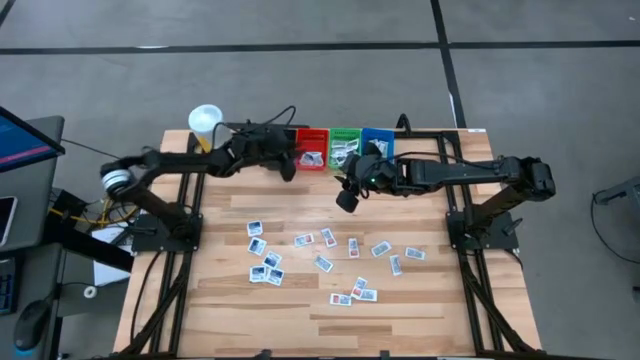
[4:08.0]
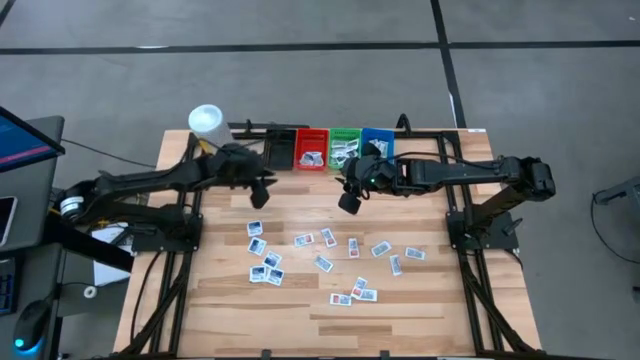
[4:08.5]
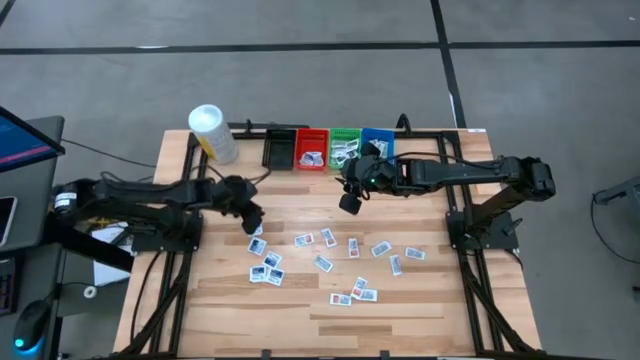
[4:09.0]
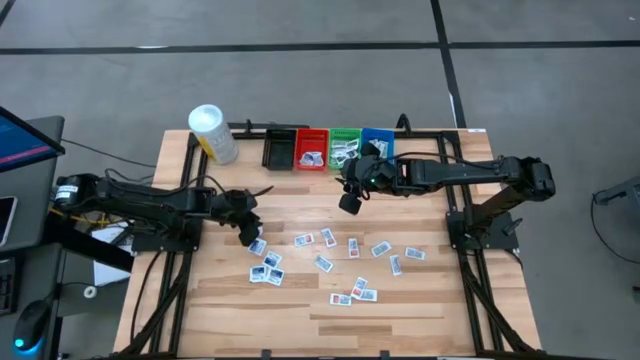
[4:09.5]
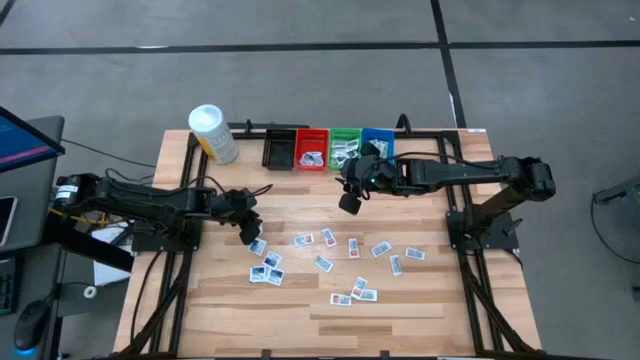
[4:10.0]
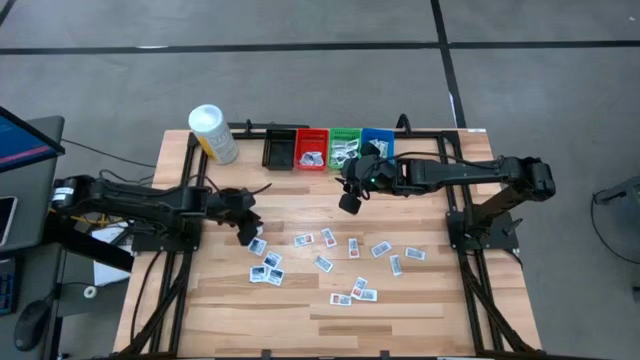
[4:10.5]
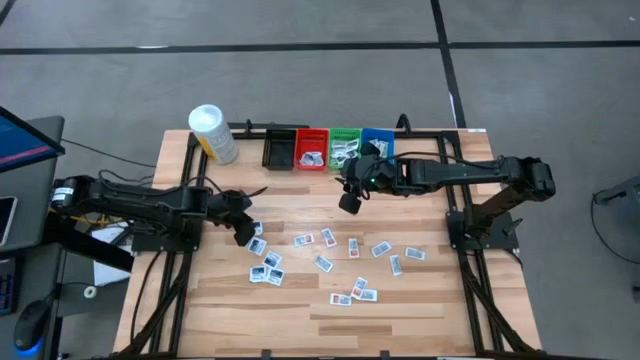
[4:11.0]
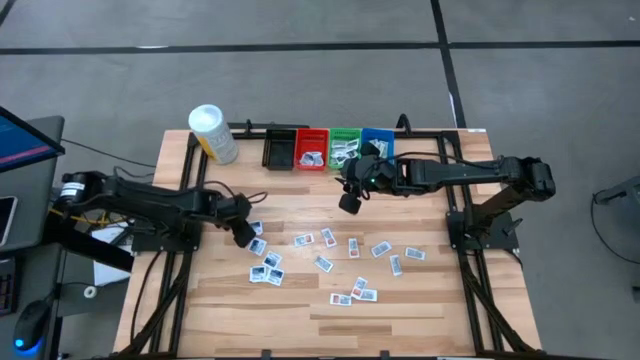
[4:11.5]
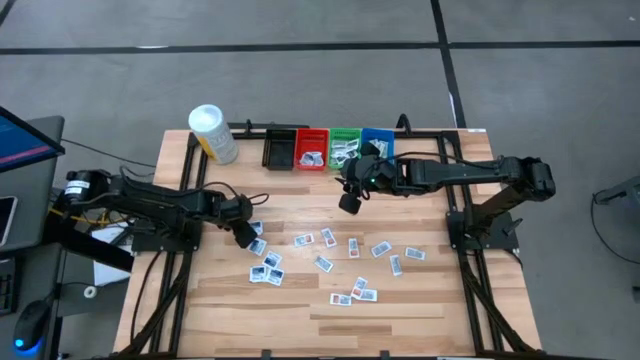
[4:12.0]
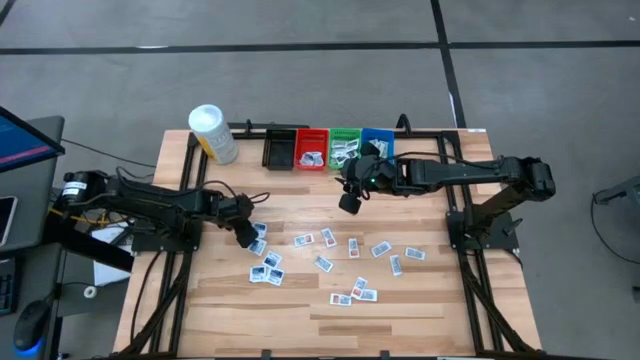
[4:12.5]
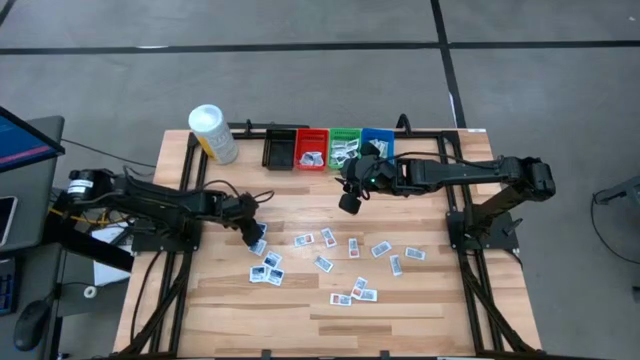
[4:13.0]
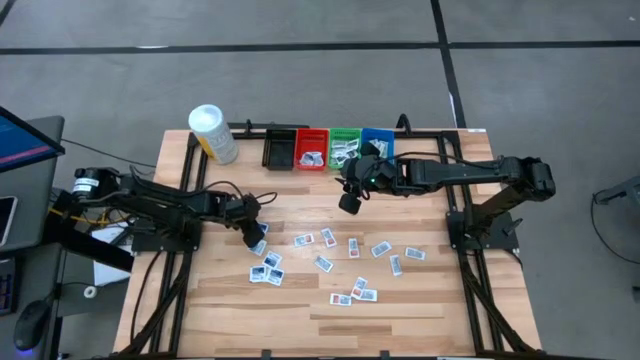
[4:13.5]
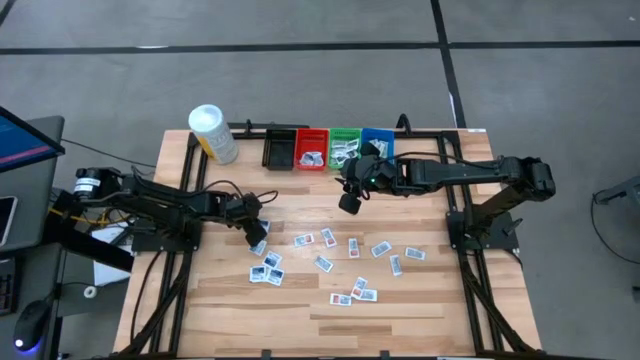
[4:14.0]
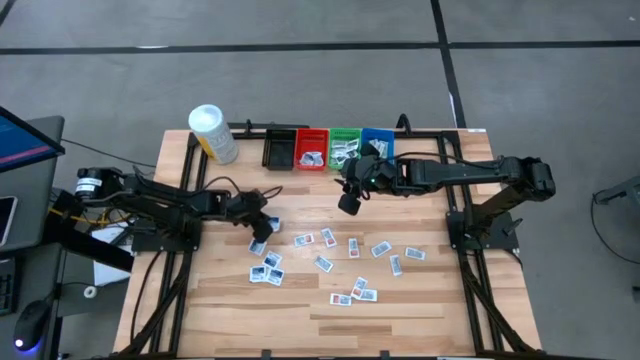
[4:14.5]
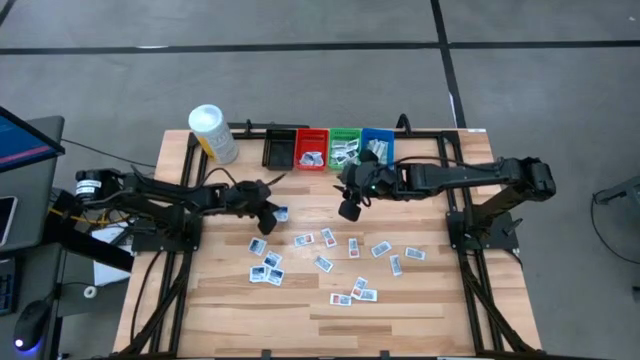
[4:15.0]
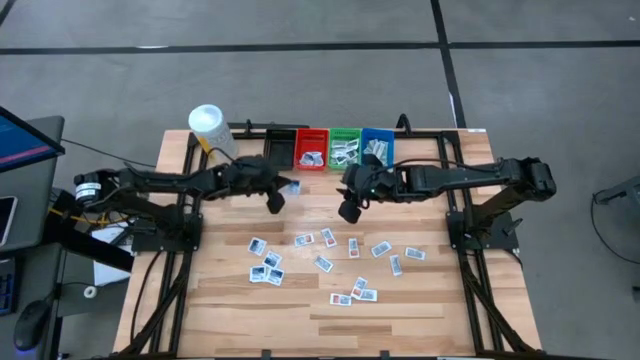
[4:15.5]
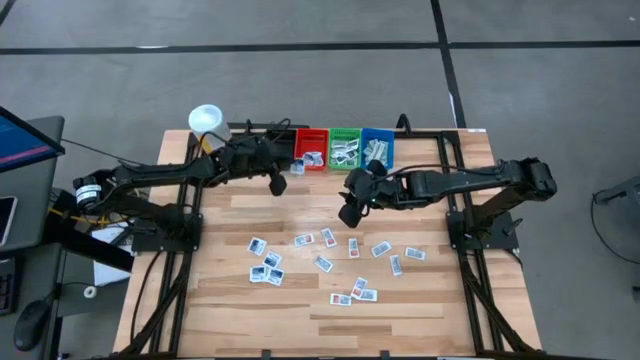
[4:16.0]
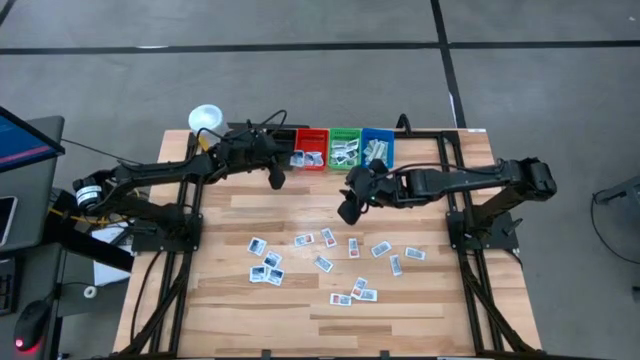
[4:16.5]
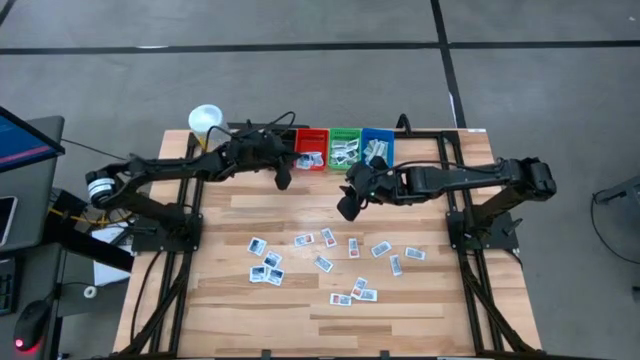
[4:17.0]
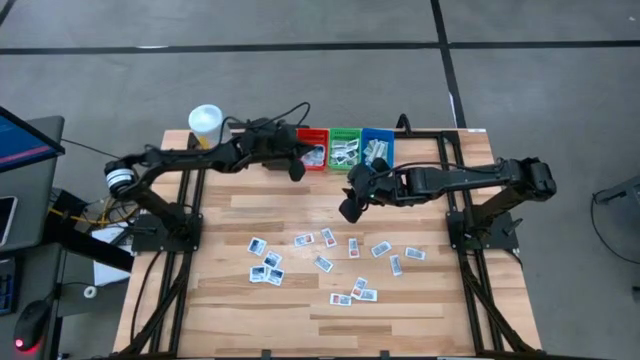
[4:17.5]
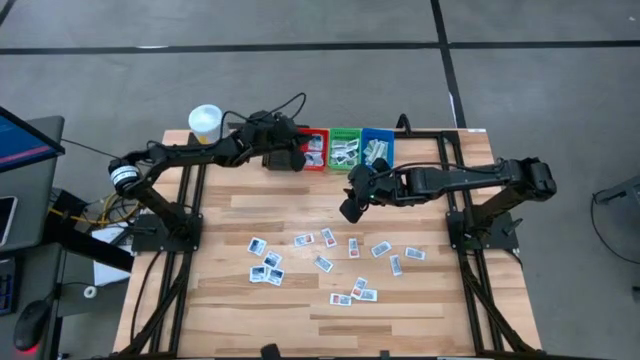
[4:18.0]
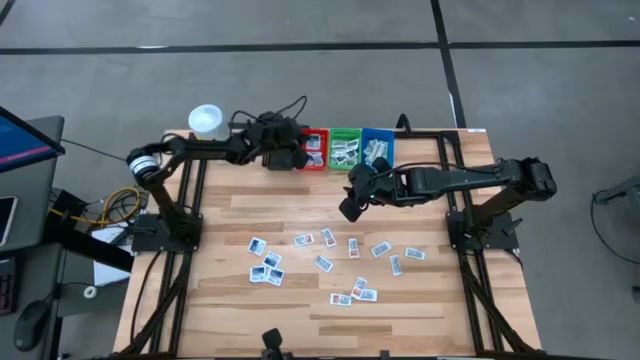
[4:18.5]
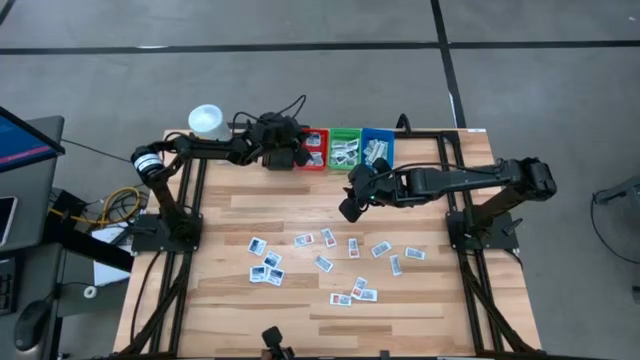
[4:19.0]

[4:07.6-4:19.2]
Task: Pick & Place First Aid Supplies
Put the alcohol pad into the red bin

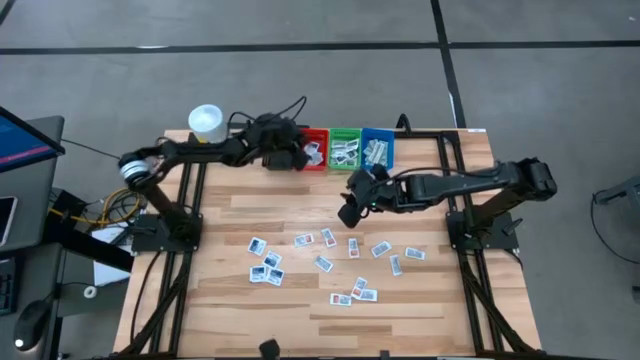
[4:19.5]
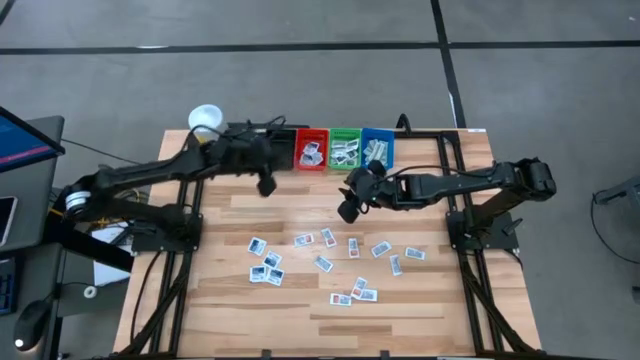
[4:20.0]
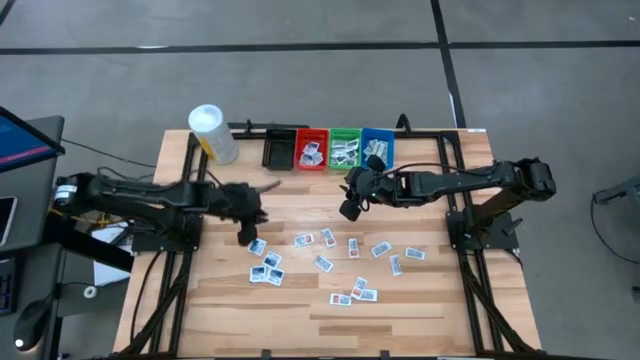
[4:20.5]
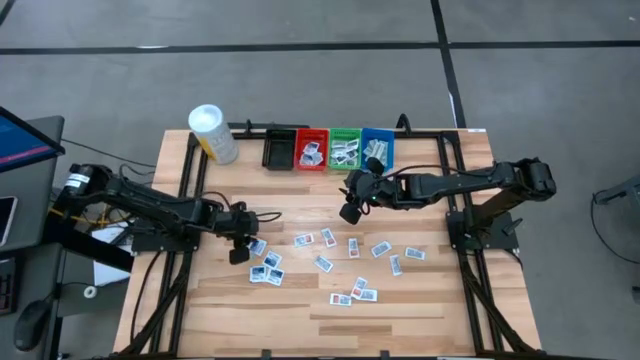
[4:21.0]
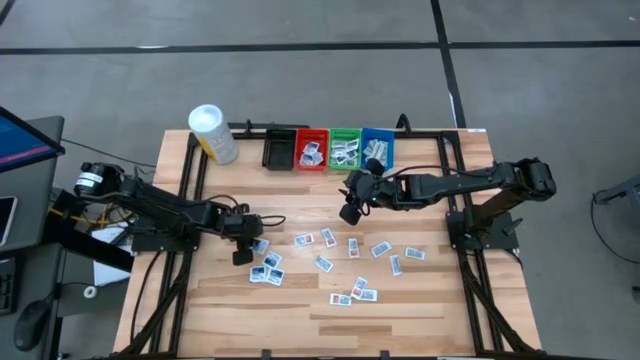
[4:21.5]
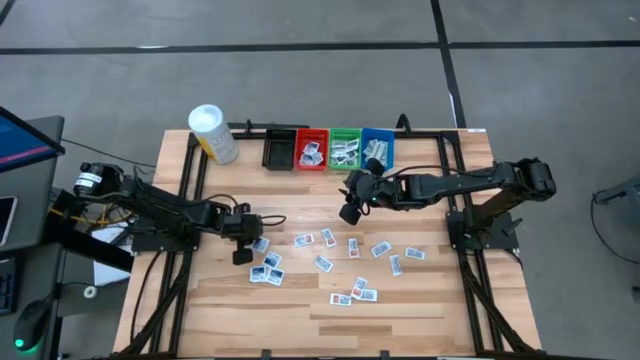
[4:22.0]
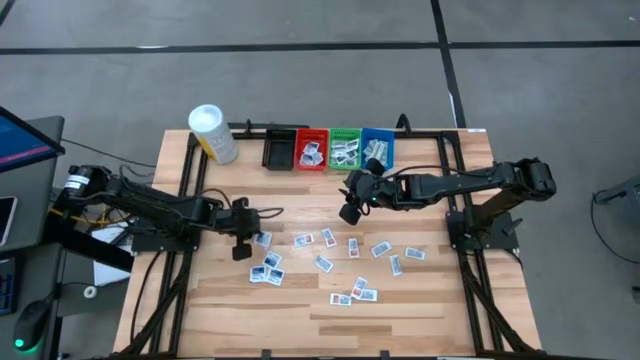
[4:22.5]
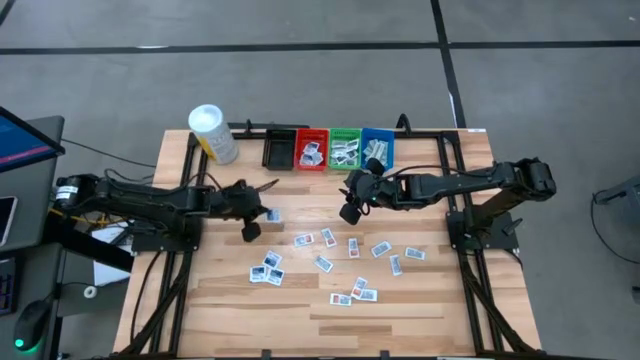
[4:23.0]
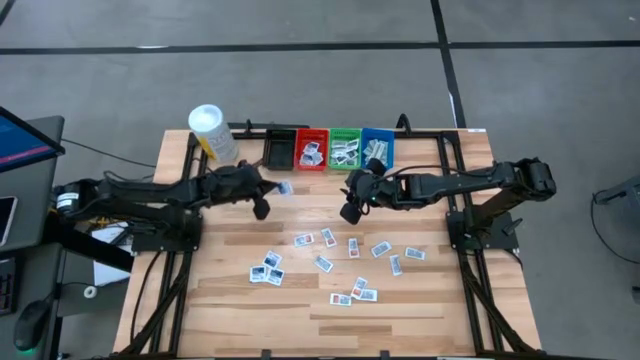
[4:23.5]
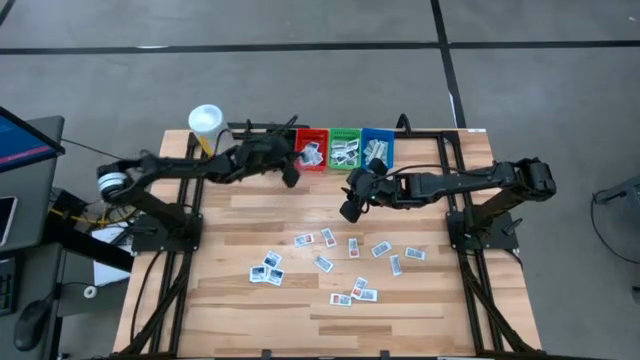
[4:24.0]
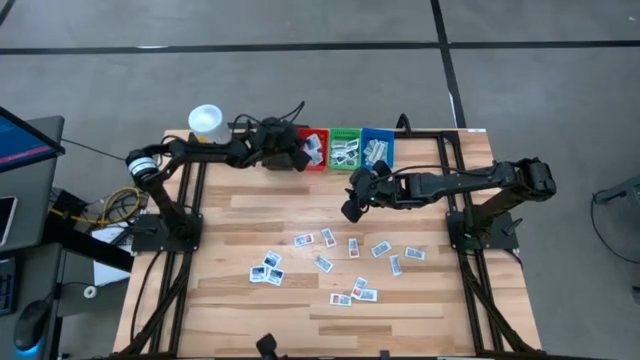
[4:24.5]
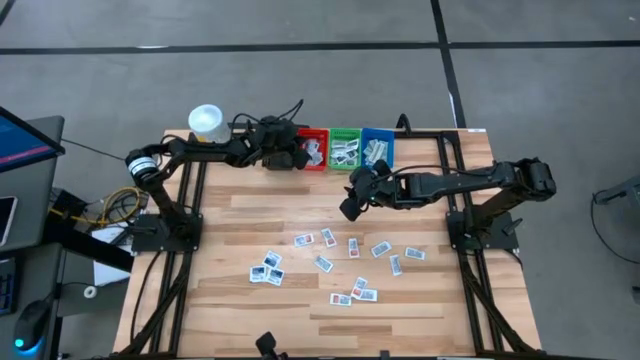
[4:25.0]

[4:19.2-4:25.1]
Put the alcohol pad into the red bin

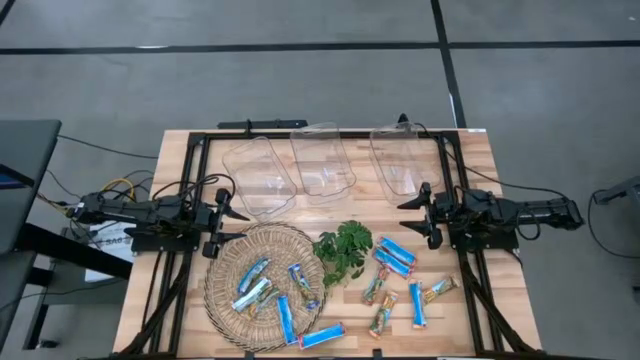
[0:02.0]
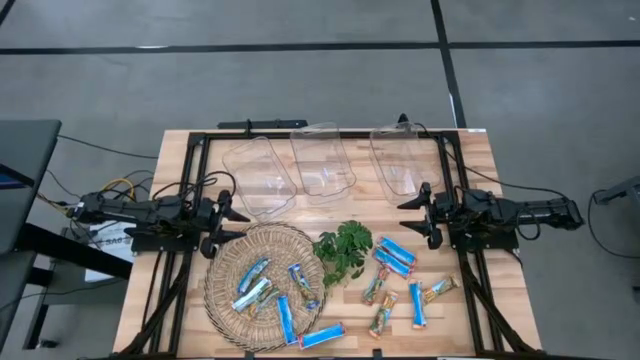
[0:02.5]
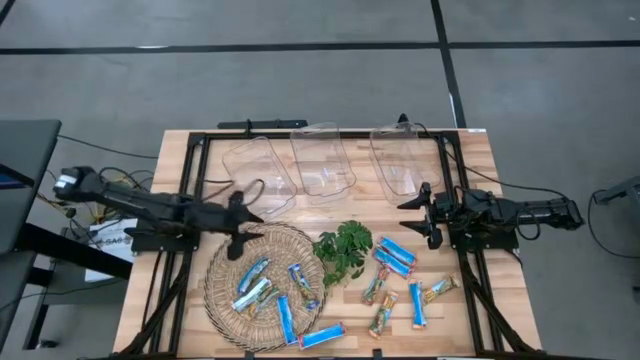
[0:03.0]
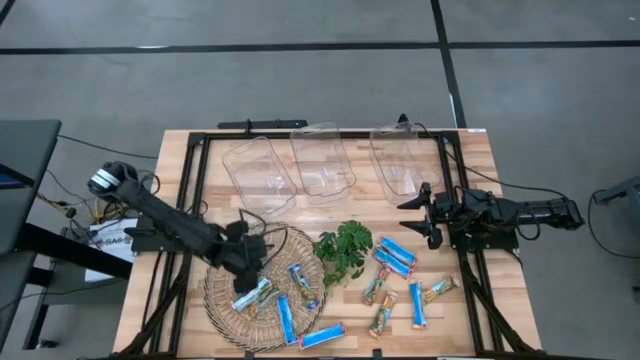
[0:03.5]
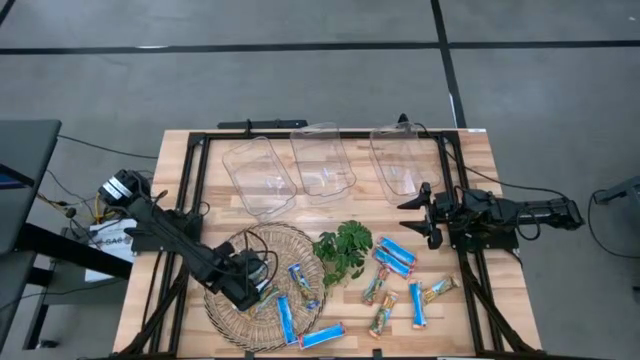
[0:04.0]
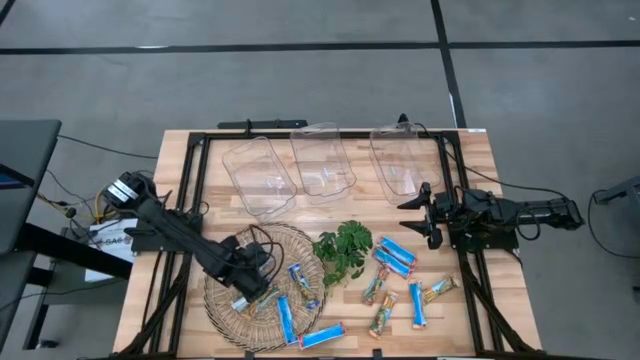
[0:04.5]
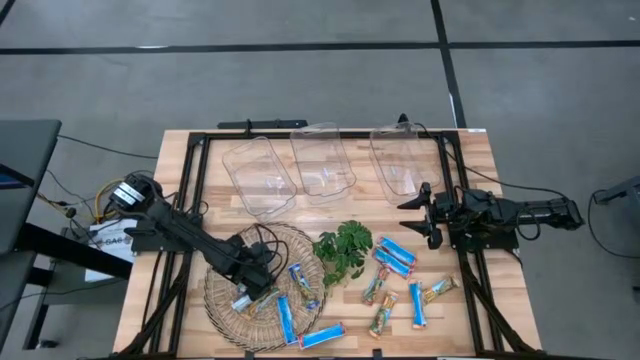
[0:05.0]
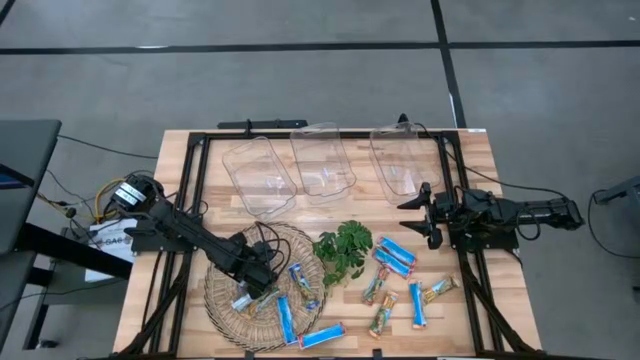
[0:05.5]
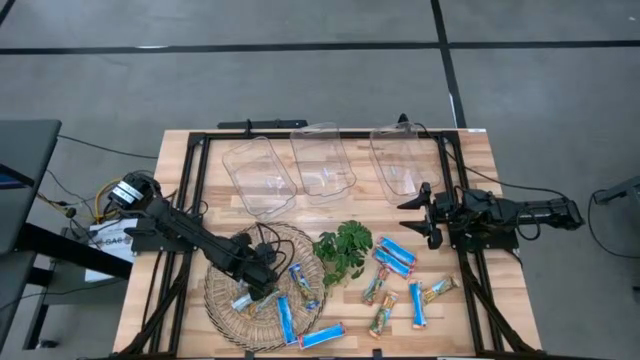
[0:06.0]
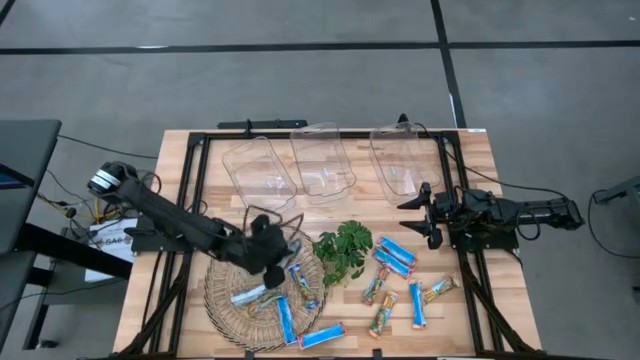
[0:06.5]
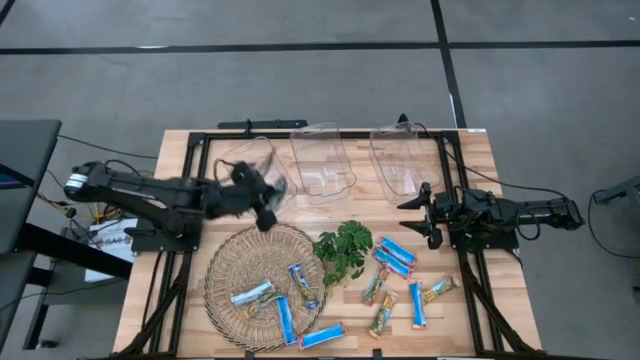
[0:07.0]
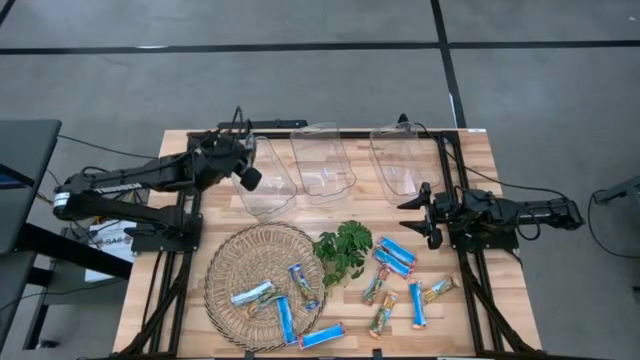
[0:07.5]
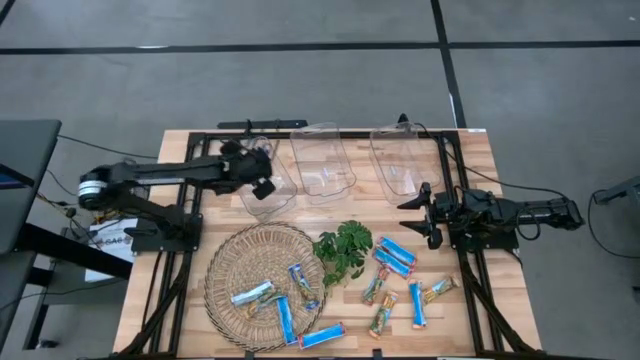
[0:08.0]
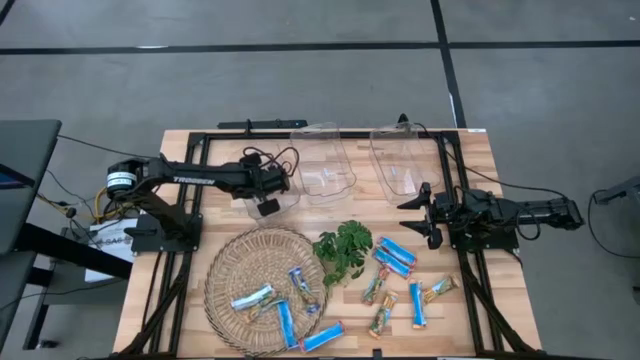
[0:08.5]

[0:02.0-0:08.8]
Task: Pick and place Granola Bars by type
Put the blue granola bar into the left transparent bin
